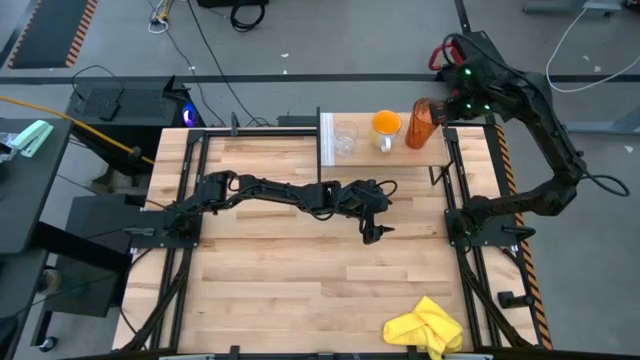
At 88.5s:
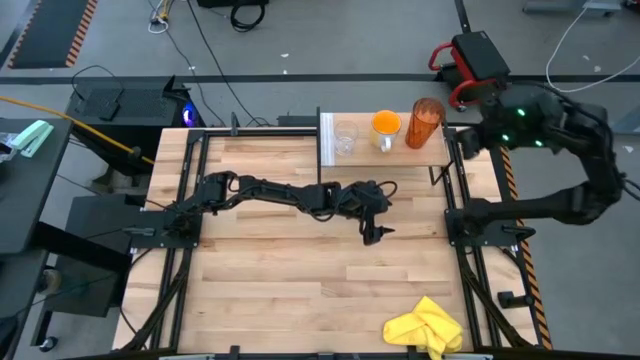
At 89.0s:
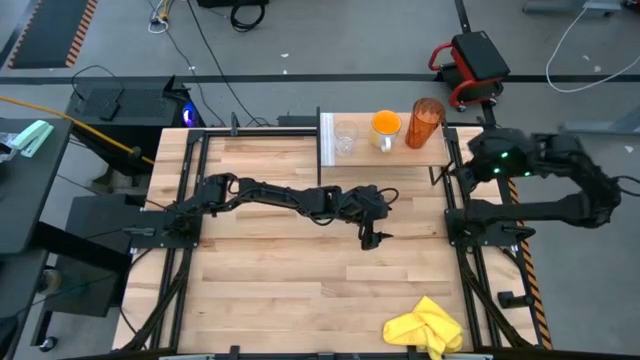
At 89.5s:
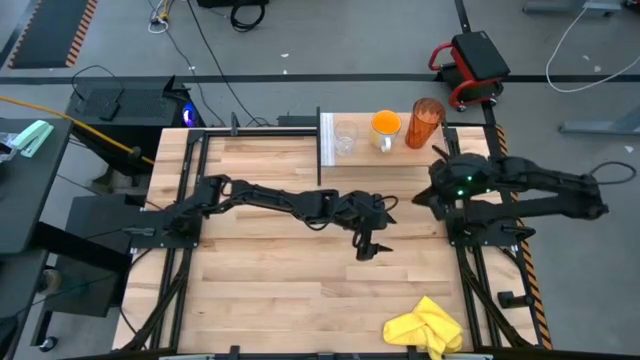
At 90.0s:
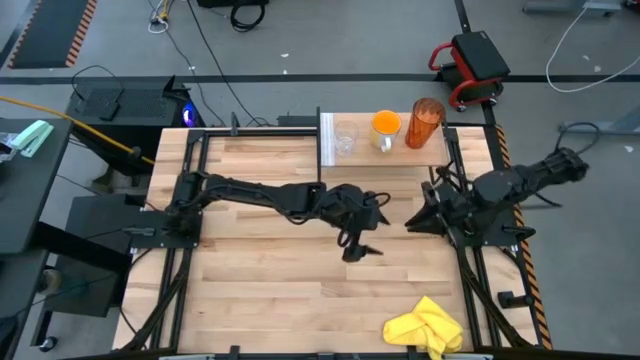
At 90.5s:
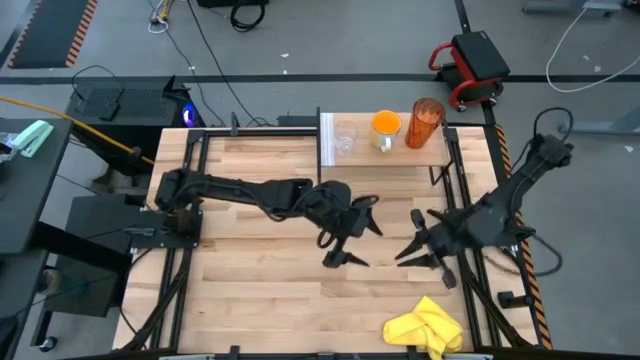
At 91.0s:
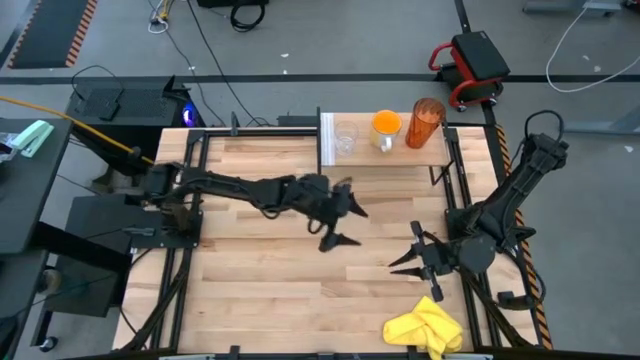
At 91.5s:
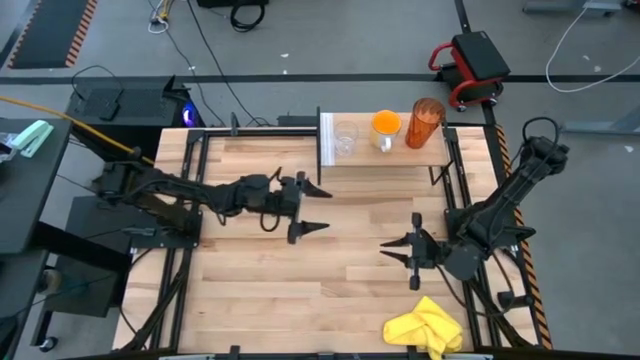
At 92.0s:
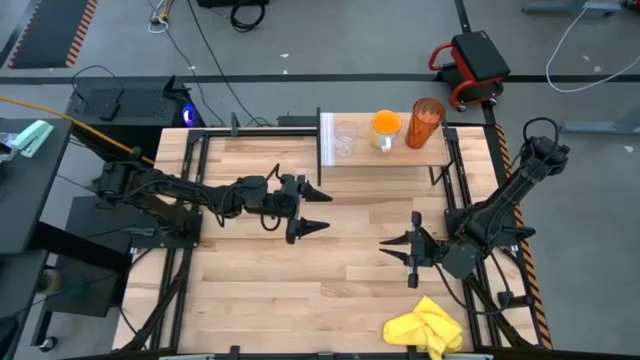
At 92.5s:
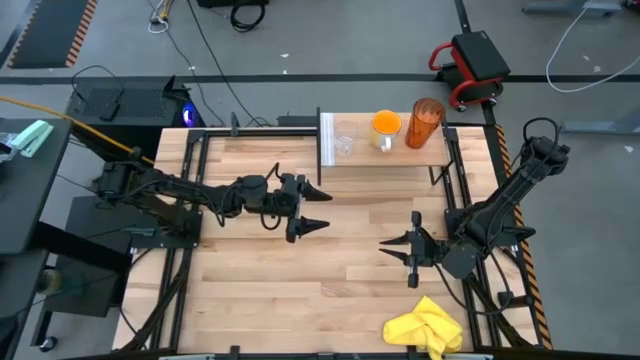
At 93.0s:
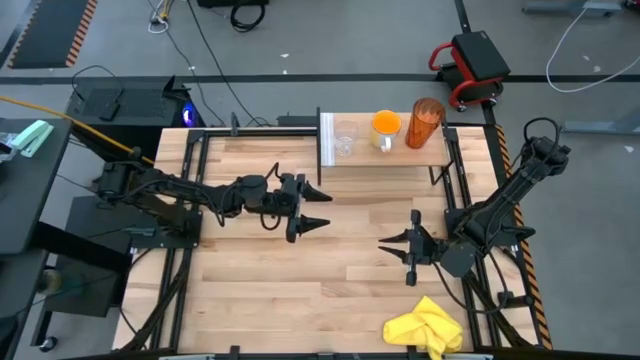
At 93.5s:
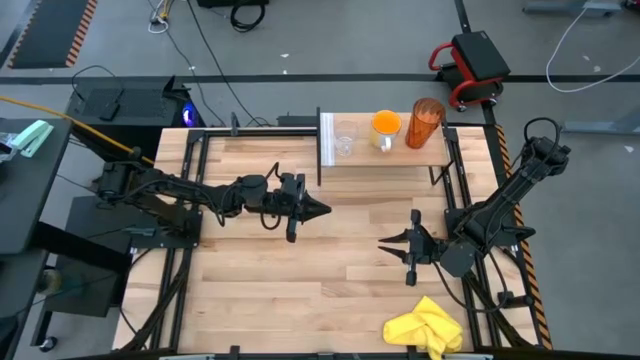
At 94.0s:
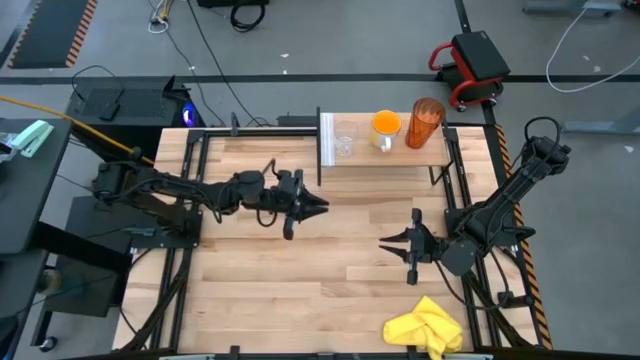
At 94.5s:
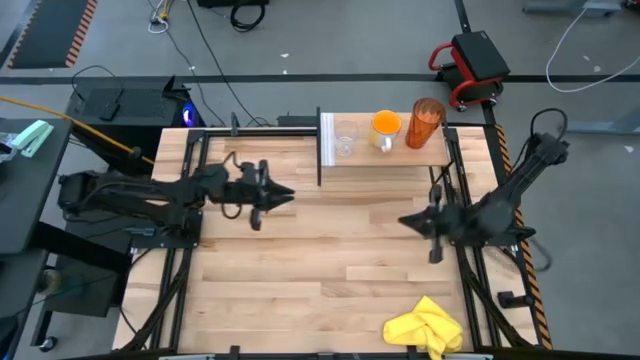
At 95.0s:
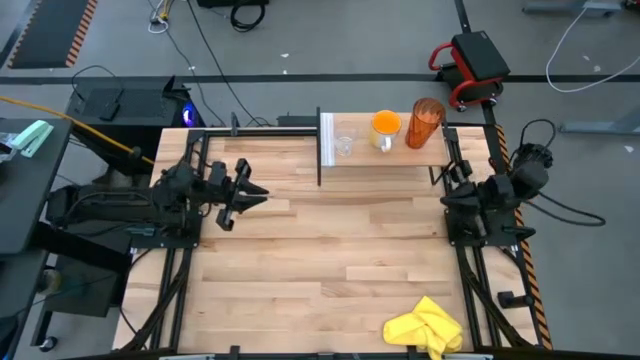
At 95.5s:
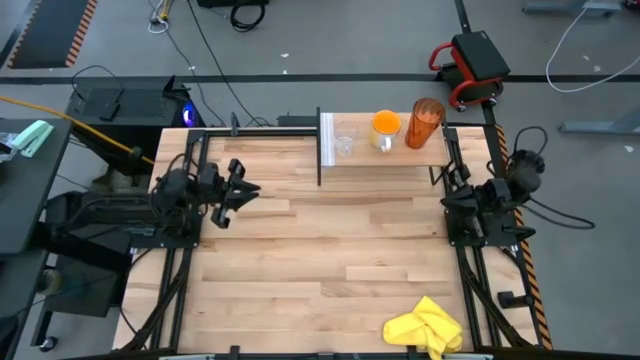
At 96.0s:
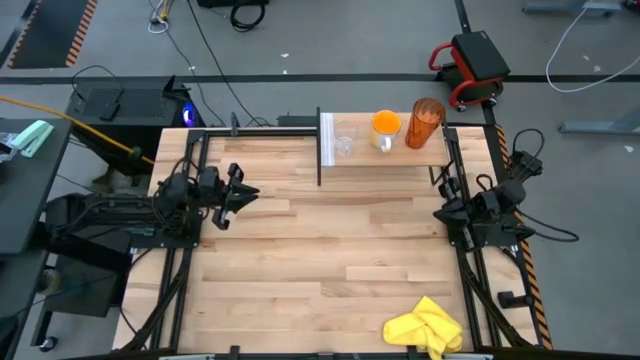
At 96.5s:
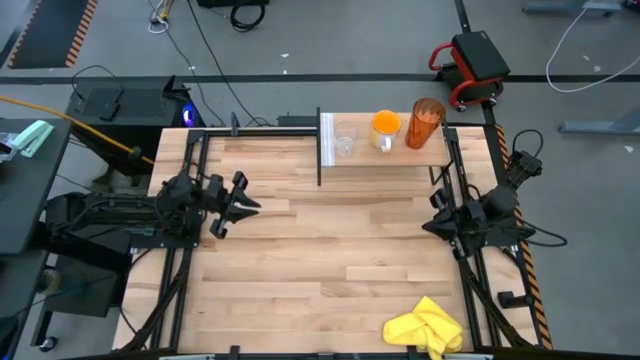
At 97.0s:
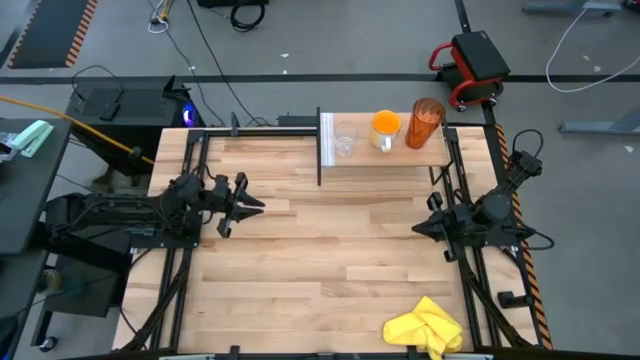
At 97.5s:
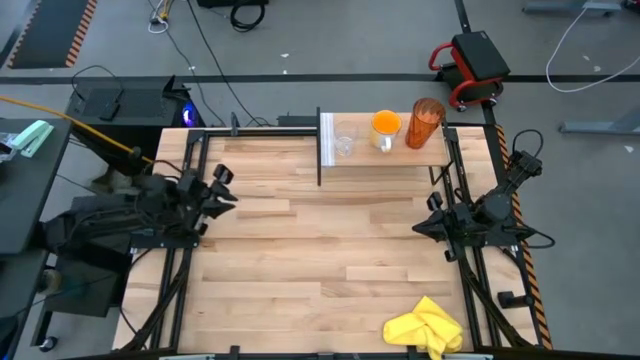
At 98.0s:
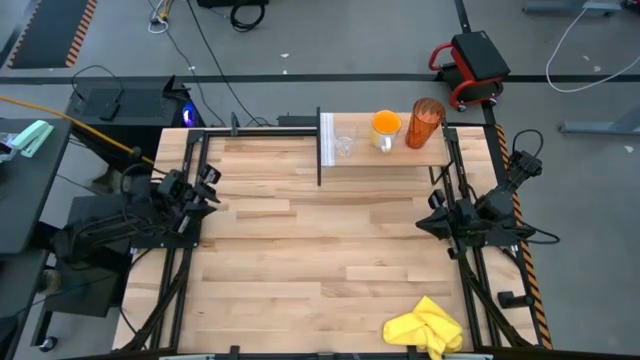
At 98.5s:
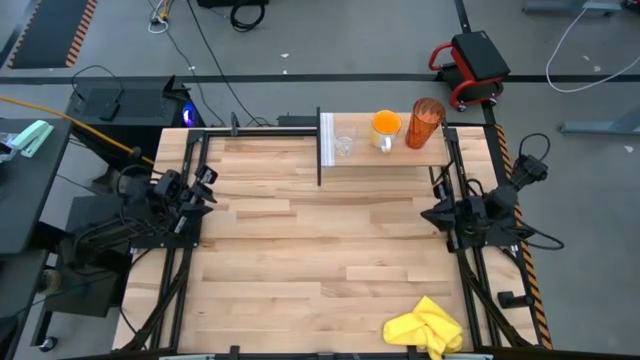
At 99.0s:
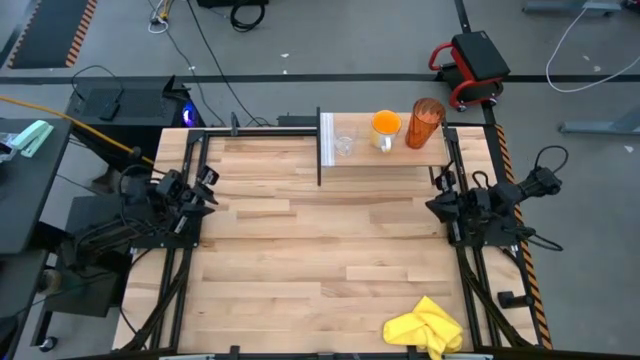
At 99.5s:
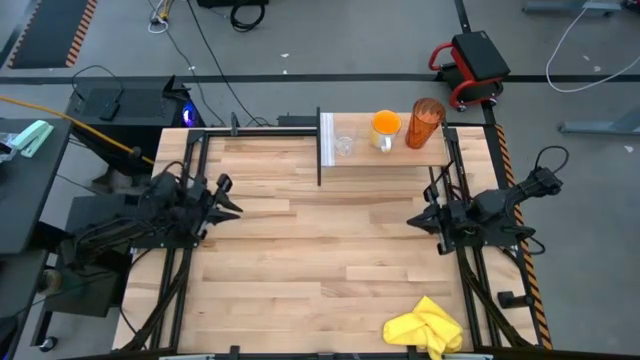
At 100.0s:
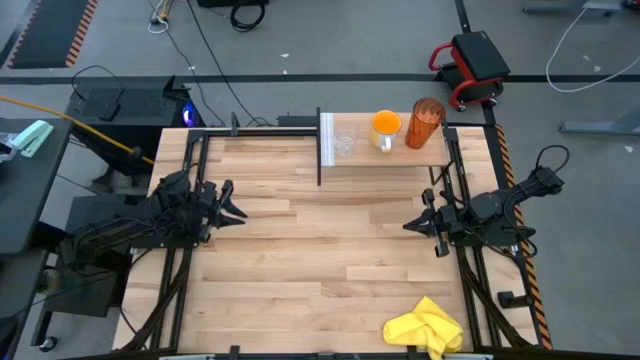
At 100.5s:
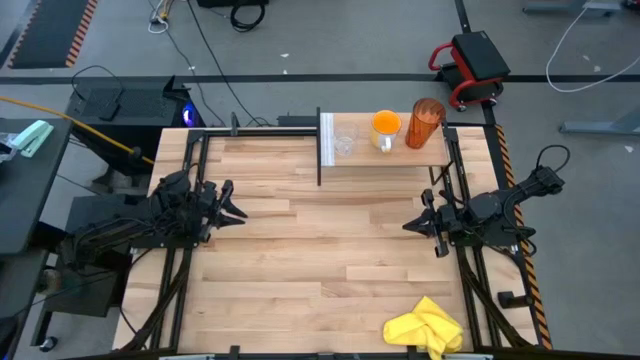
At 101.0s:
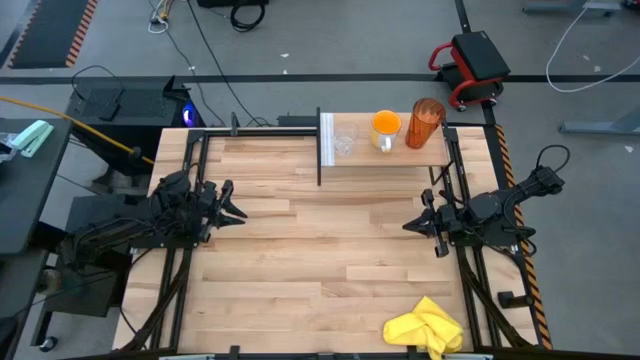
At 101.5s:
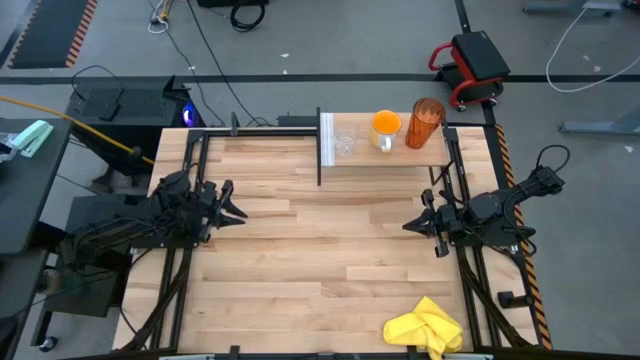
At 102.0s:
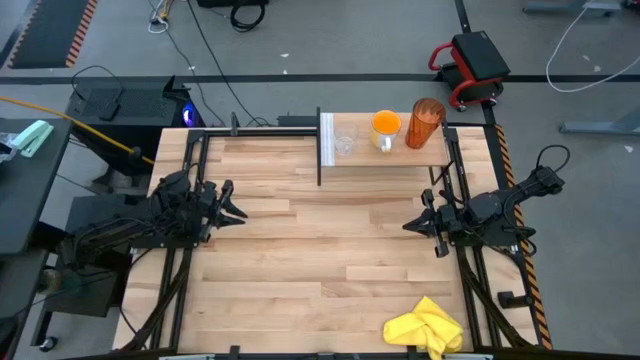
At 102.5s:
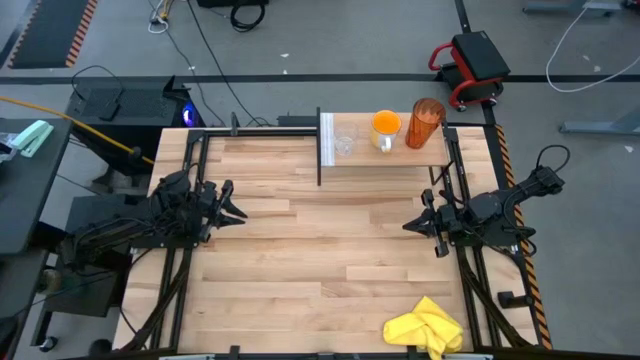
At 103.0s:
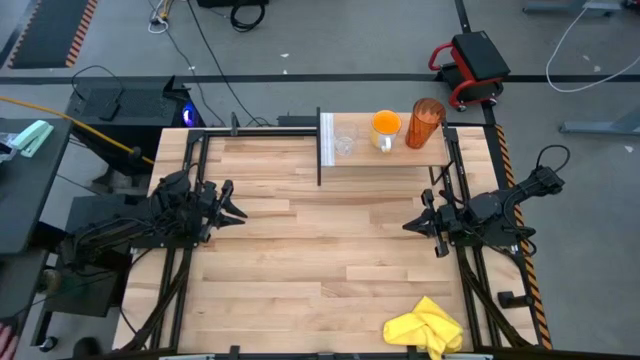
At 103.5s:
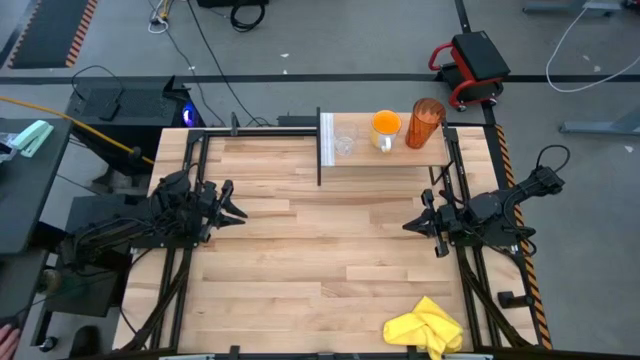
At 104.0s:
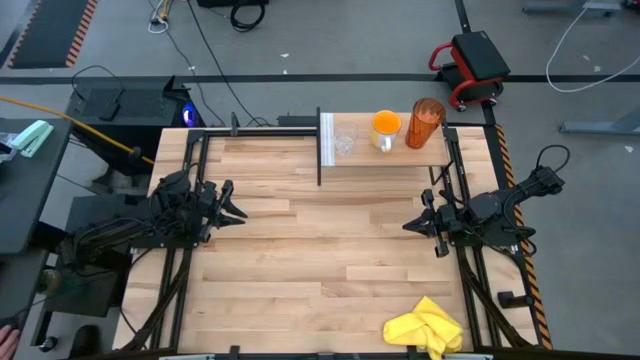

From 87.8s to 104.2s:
Task: Stack small to large cups/mugs on shelf
Return to Home Position

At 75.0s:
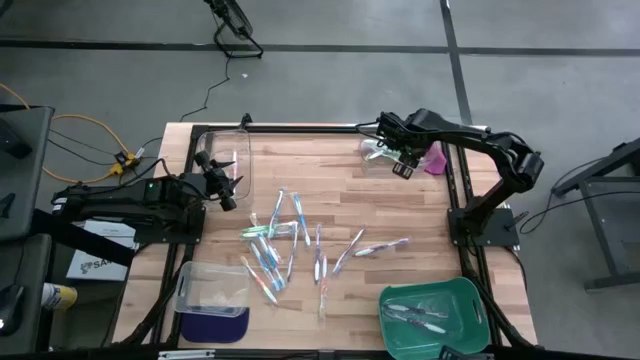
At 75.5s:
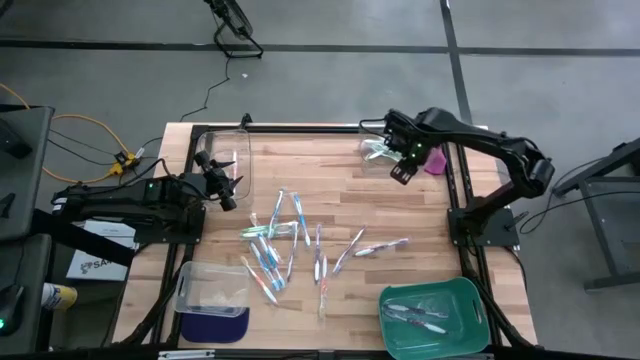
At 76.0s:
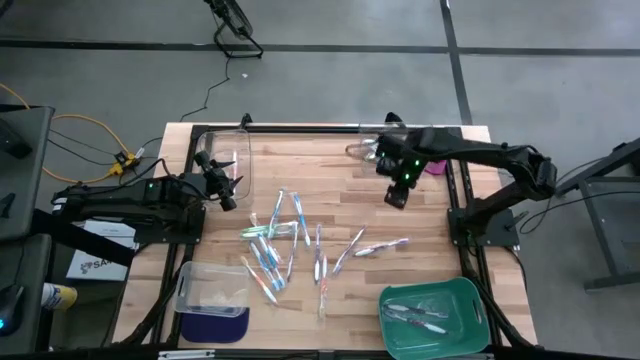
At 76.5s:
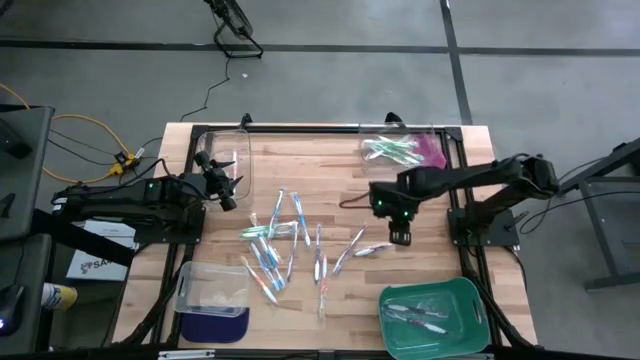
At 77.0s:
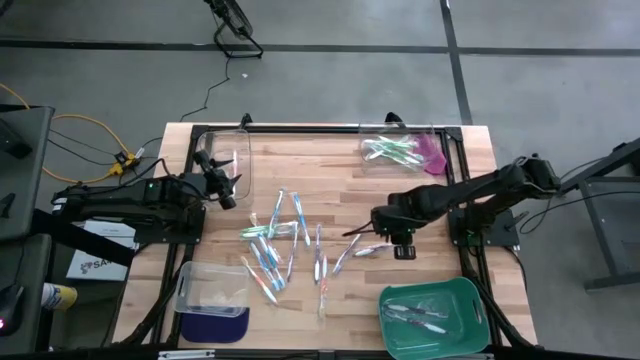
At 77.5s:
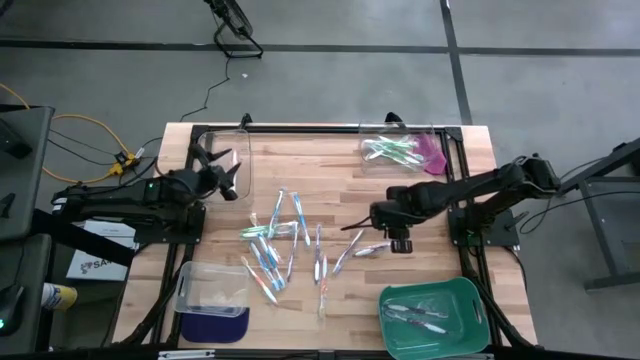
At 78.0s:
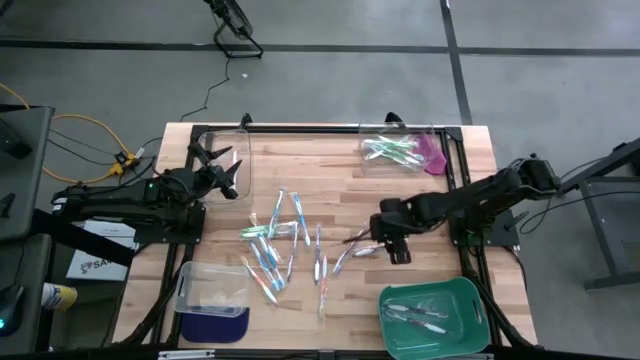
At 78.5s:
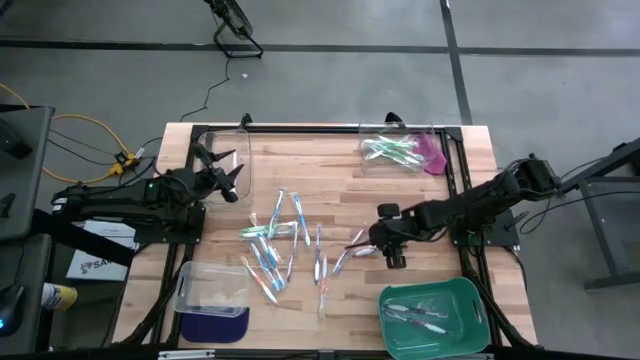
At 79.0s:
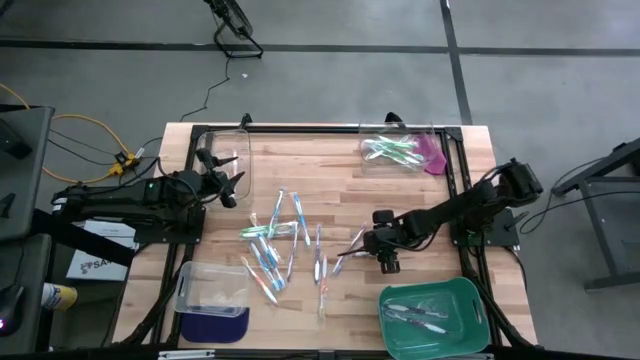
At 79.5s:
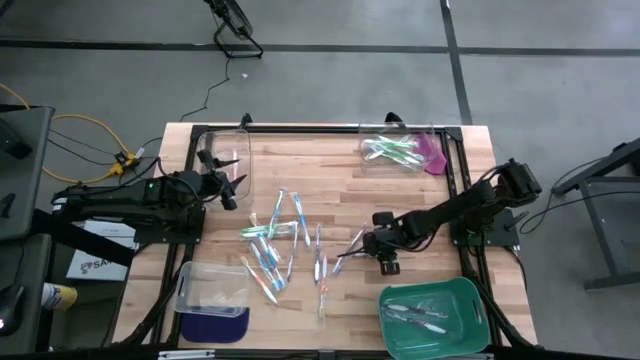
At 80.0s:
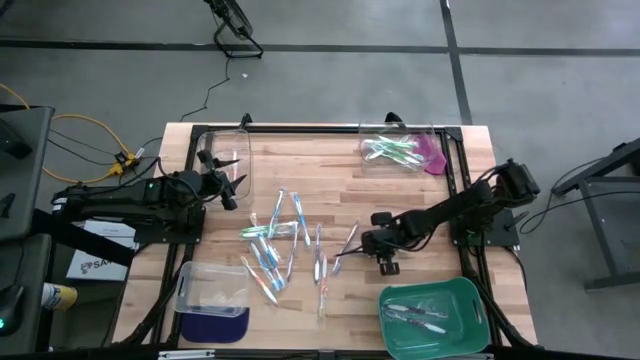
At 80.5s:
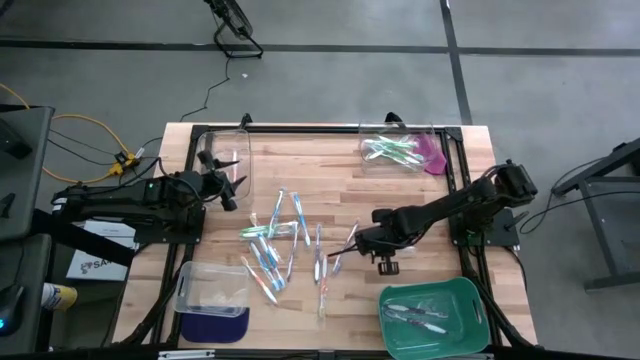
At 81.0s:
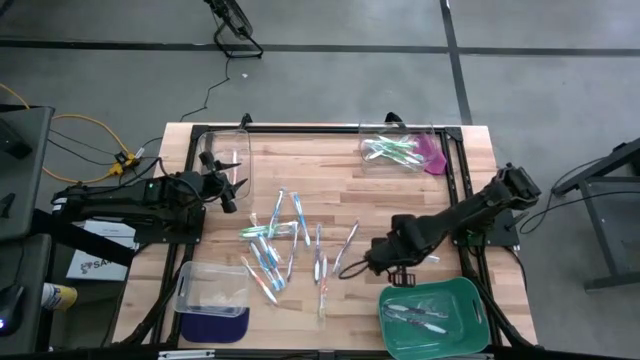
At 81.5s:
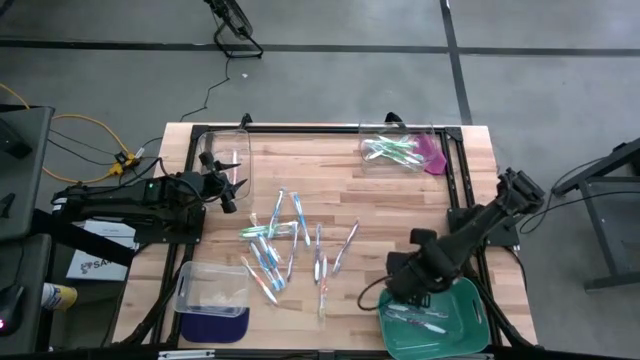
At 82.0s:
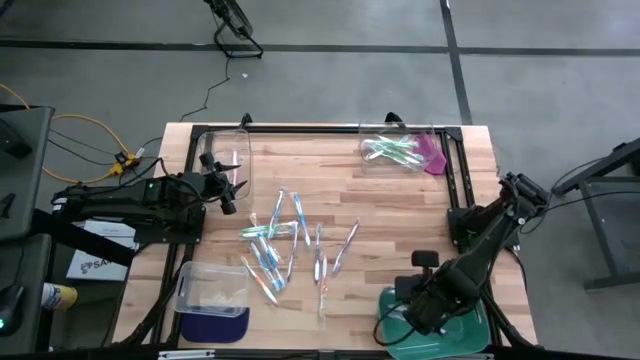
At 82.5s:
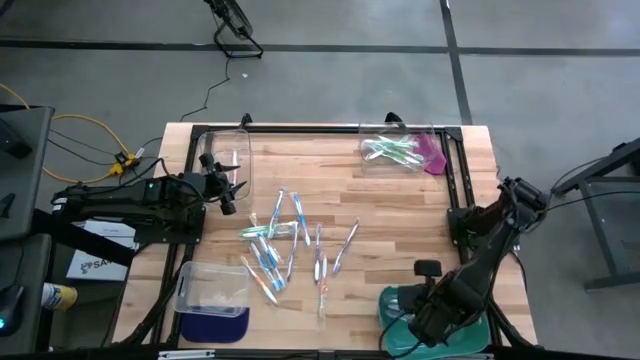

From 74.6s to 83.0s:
Task: Pick & Place Toothbrushes
Put the violet toothbrush into the green bin
